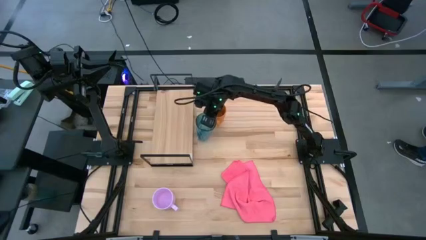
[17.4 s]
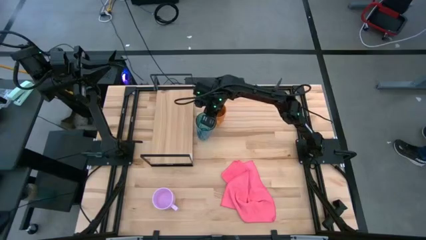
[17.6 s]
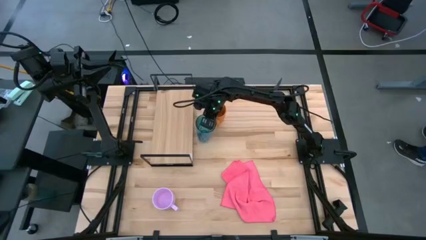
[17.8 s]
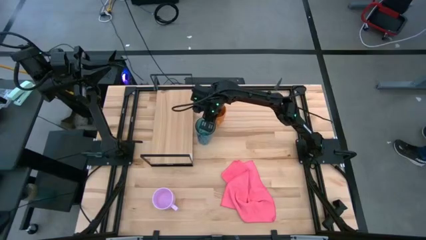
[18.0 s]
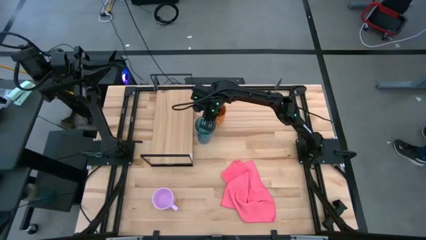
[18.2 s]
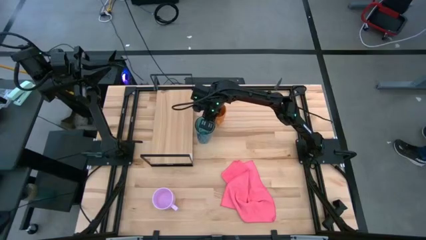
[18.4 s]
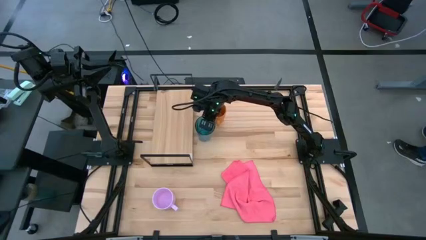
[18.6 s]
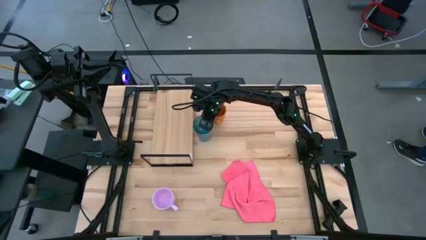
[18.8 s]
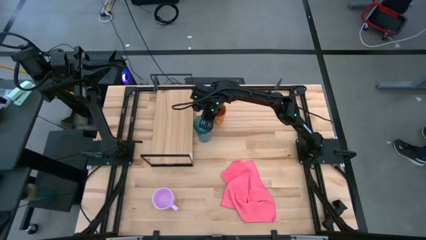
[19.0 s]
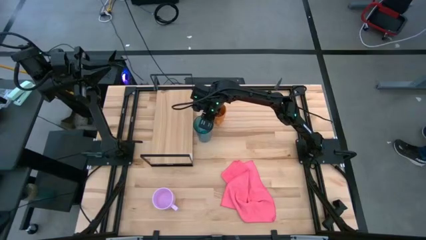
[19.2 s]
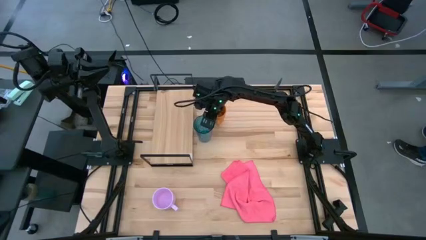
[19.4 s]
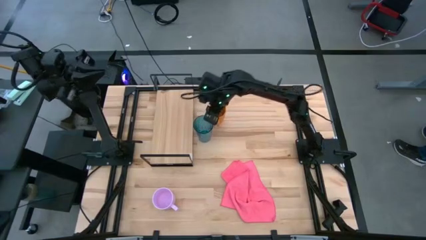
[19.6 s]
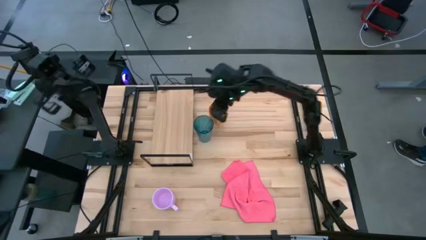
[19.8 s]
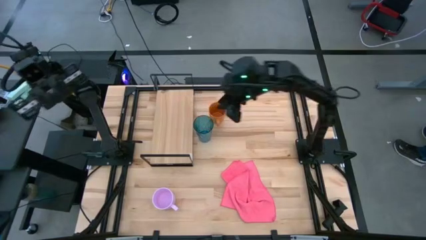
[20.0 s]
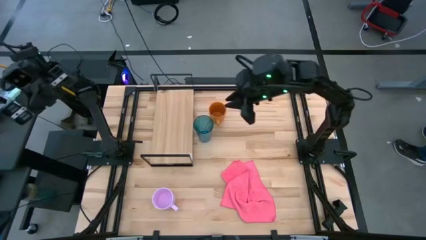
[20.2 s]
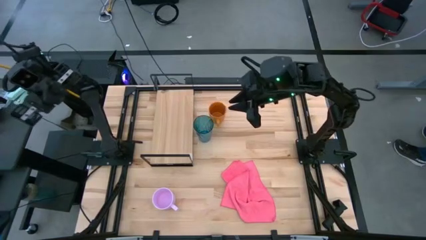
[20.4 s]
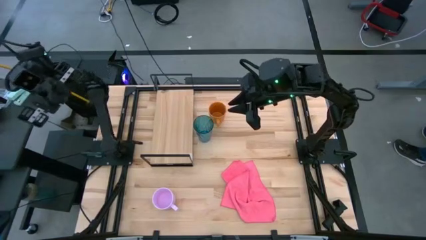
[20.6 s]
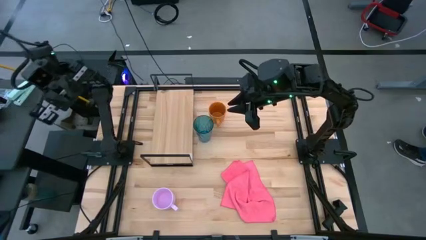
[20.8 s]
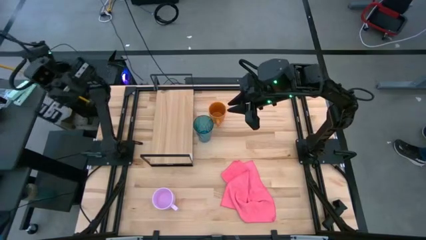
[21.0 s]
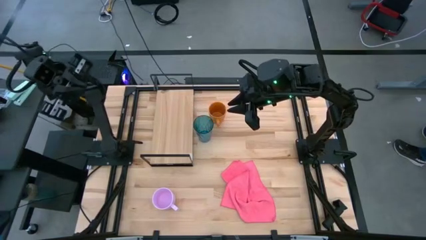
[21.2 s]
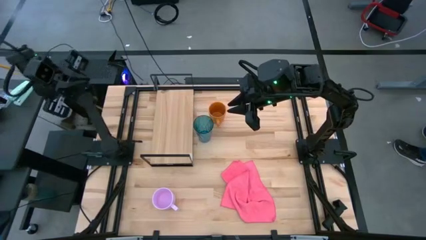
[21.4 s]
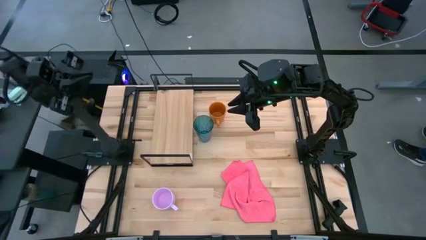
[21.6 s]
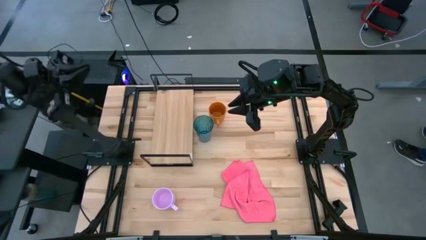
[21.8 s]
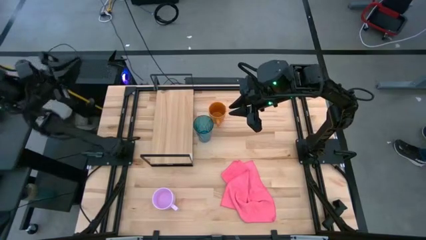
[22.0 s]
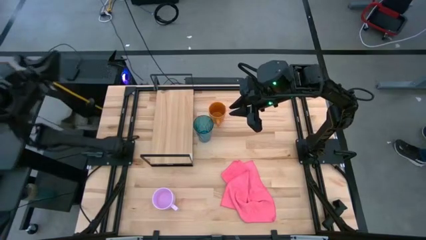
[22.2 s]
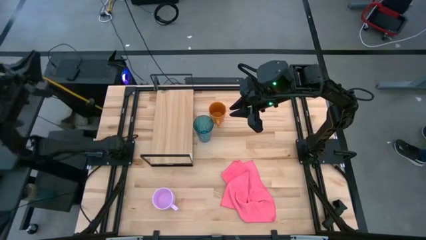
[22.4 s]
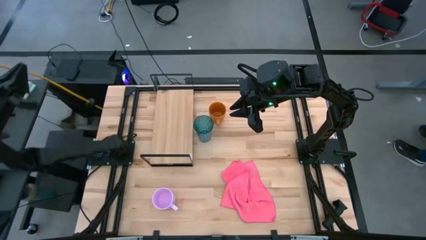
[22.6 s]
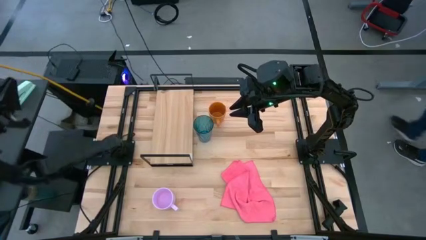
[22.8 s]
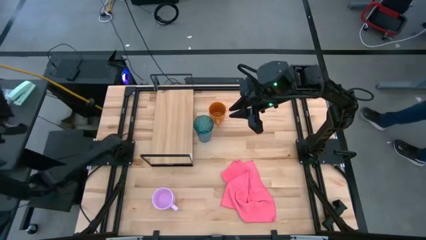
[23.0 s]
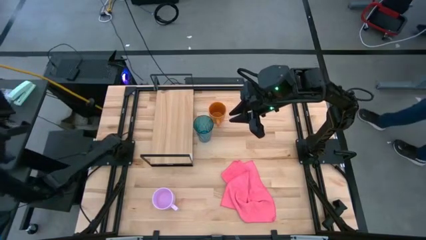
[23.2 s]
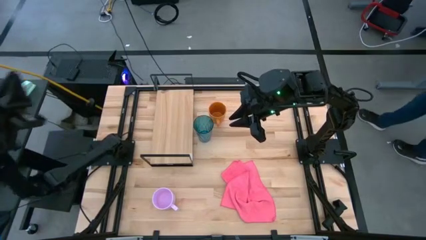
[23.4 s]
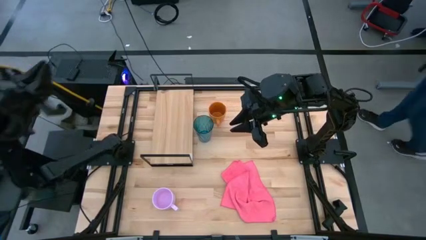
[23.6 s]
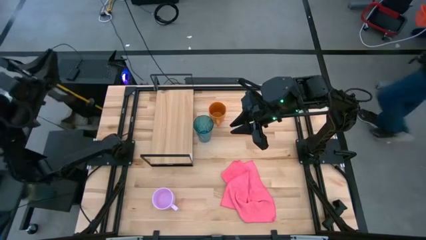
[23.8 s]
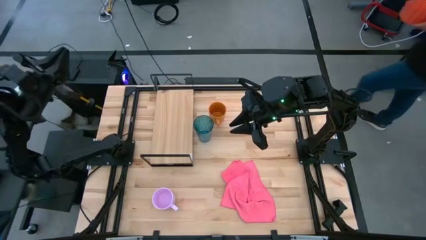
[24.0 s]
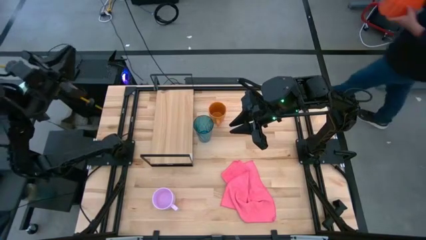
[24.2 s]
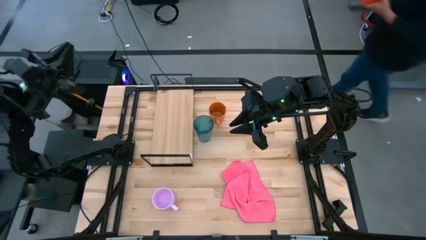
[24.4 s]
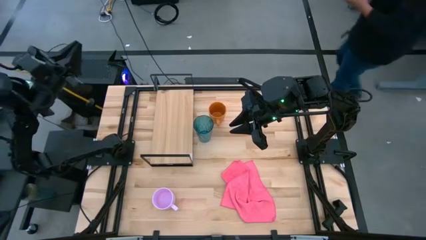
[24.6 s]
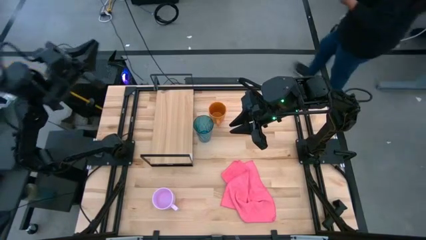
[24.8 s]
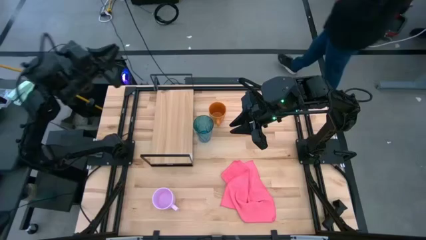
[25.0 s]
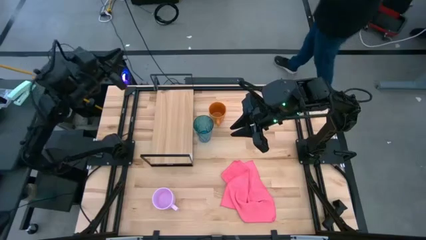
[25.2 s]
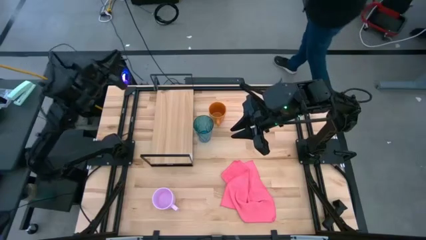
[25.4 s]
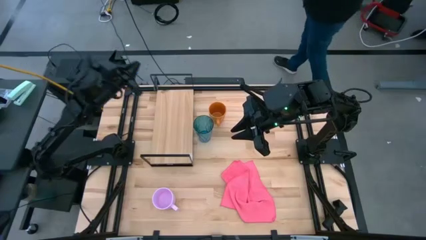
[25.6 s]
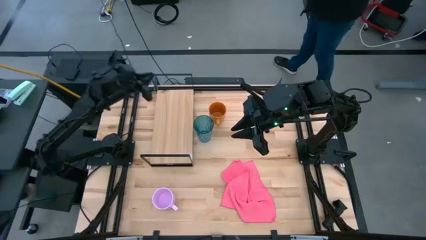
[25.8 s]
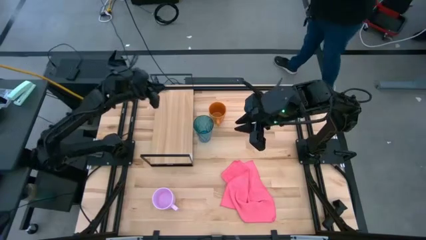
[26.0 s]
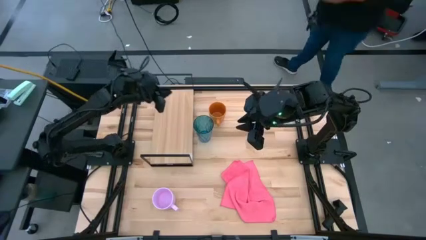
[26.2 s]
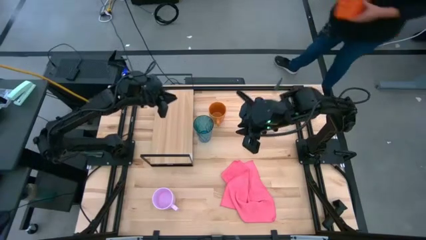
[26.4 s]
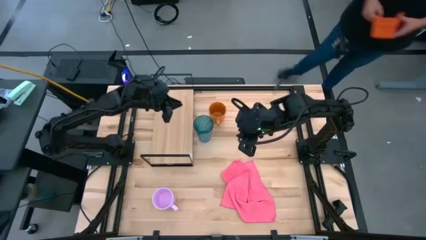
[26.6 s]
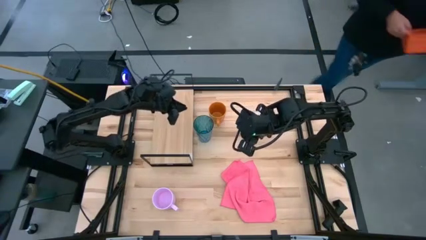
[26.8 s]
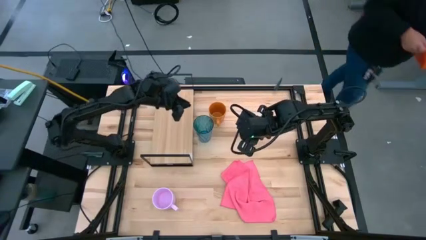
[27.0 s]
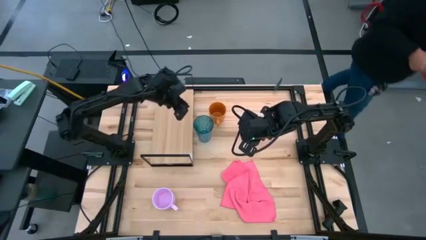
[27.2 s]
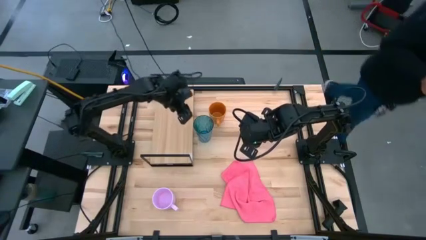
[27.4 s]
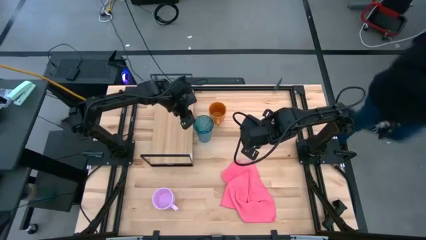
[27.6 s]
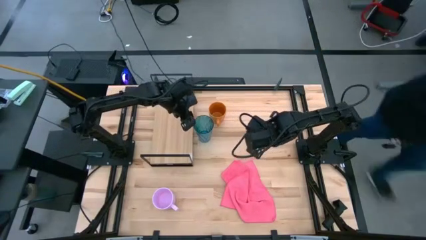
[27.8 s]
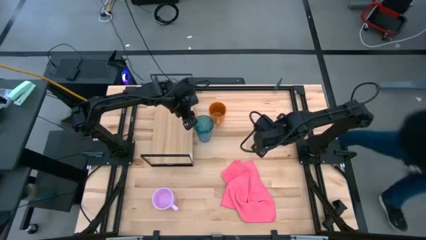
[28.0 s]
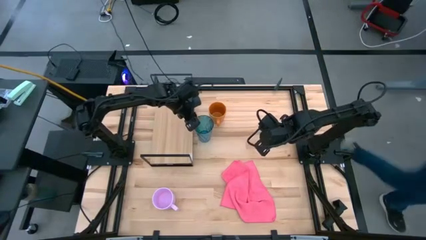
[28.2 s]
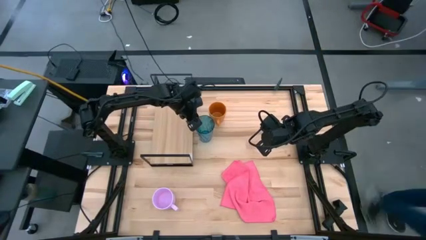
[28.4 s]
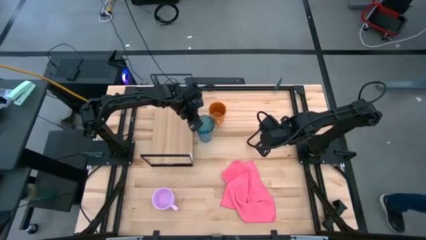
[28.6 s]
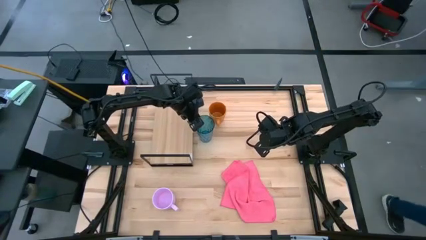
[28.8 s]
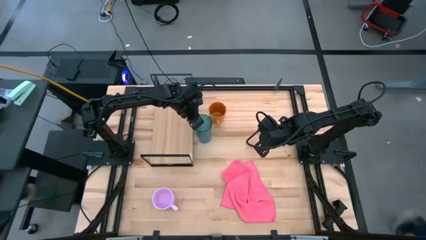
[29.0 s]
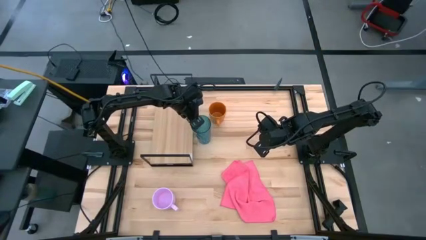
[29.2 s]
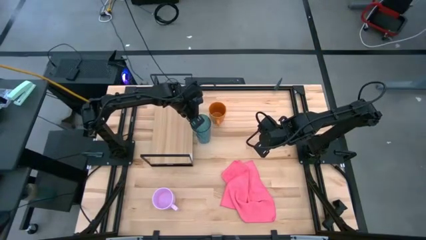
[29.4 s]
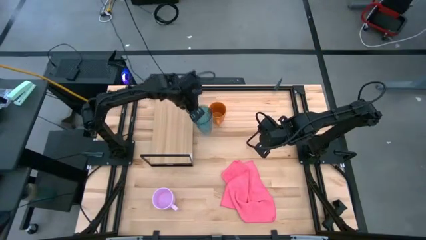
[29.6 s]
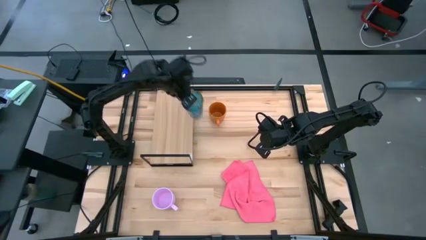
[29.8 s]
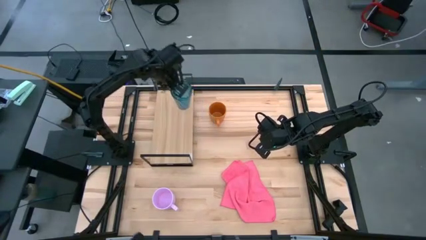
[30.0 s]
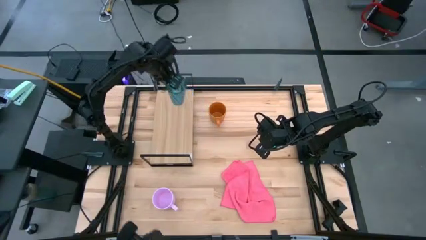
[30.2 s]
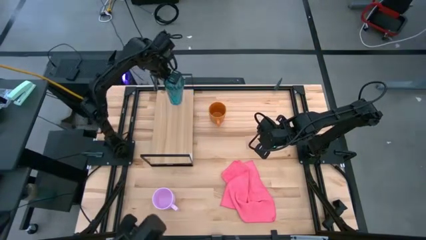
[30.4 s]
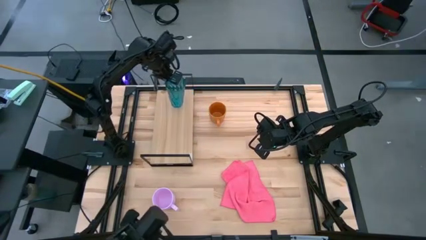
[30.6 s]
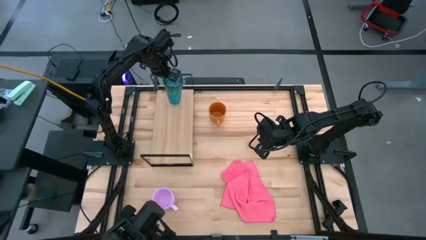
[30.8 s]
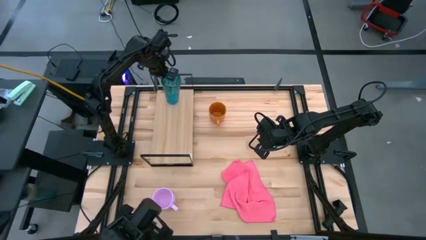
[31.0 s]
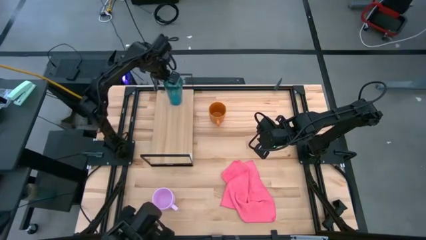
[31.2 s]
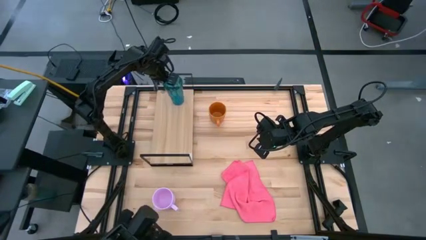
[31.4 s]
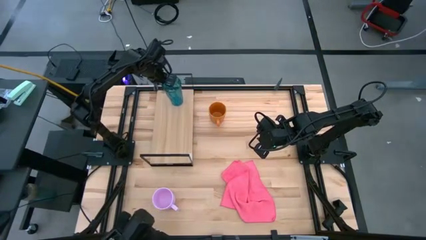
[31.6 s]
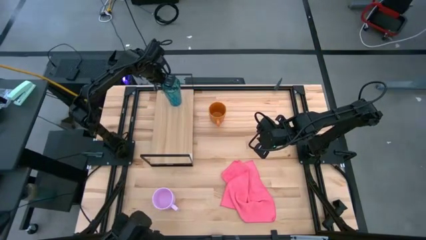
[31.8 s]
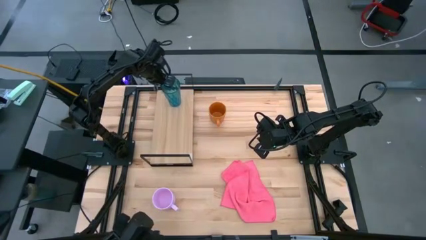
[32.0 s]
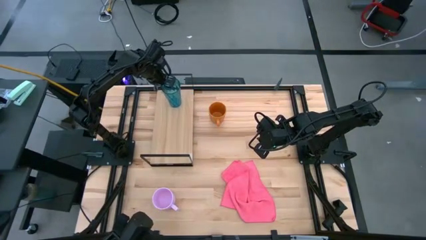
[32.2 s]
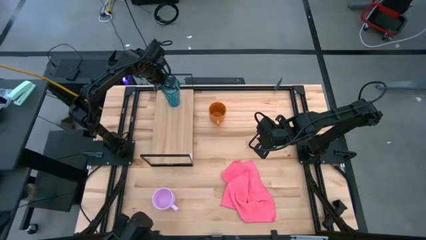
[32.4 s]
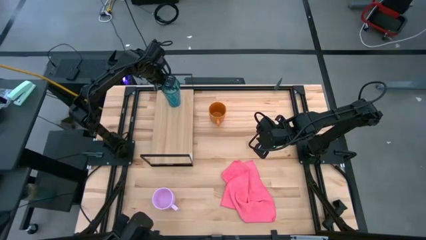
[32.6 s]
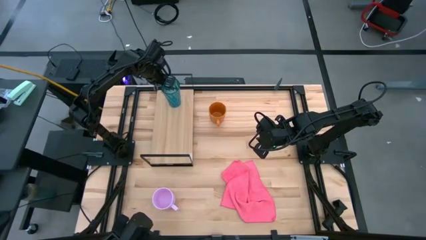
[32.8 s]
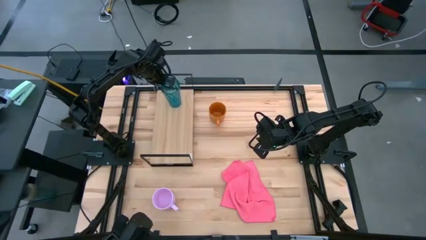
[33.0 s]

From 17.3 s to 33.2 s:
Task: Stack small to large cups/mugs on shelf
Put the blue cup on the shelf
